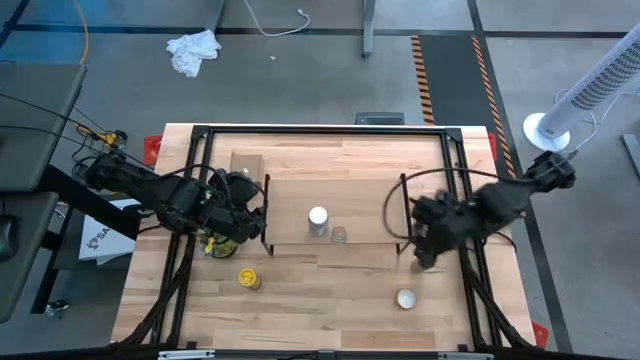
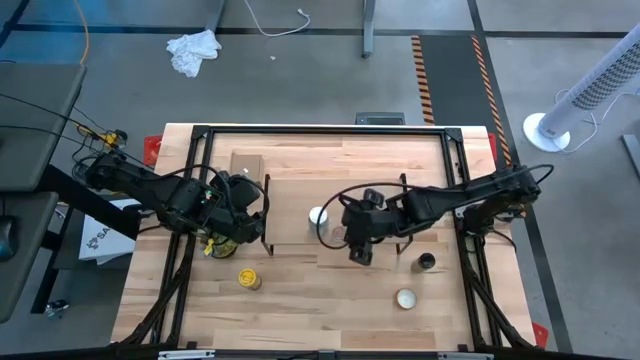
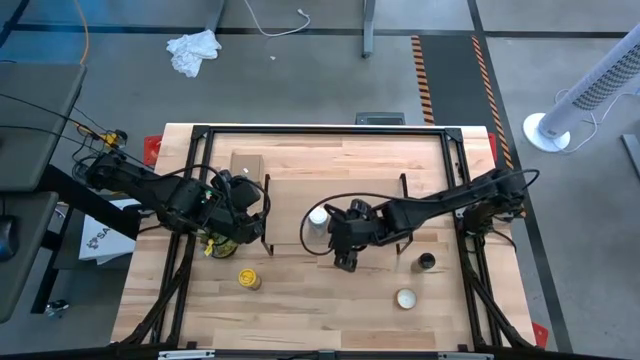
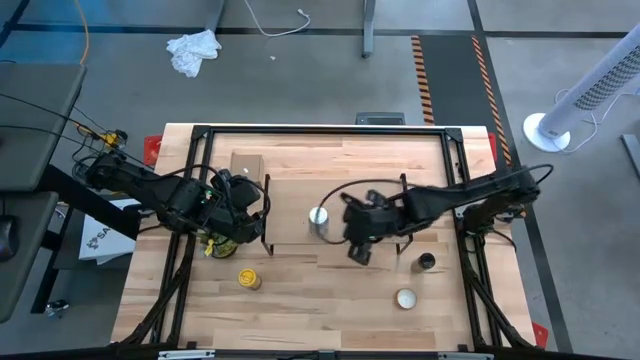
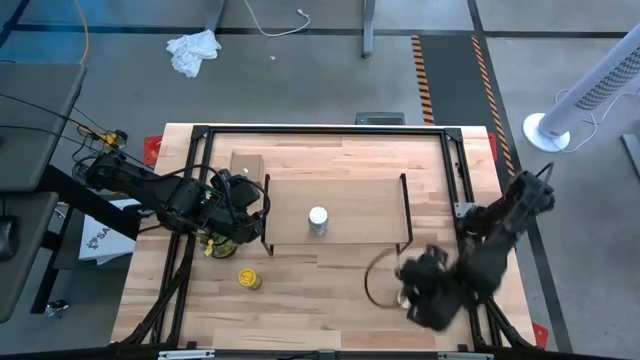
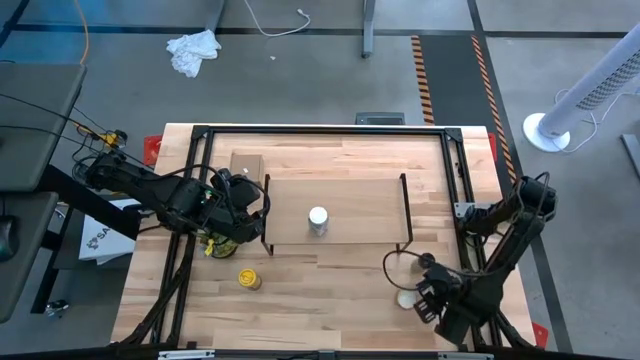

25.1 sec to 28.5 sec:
Task: Shelf spices
Remove the brown seasoning bottle from the shelf

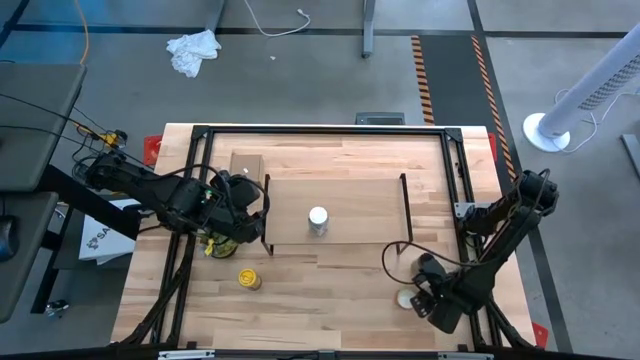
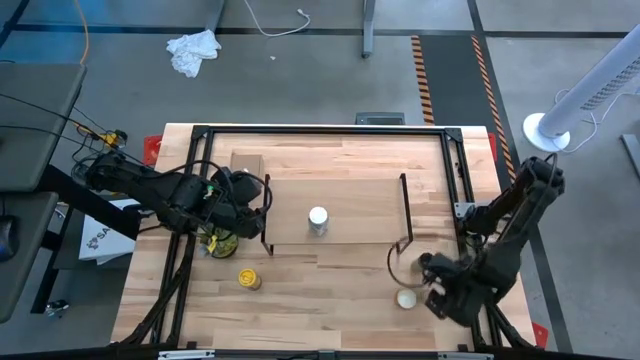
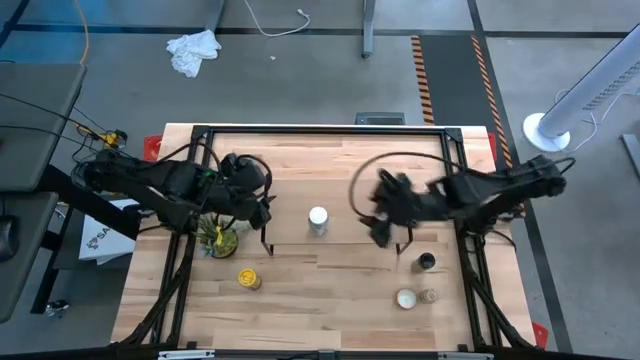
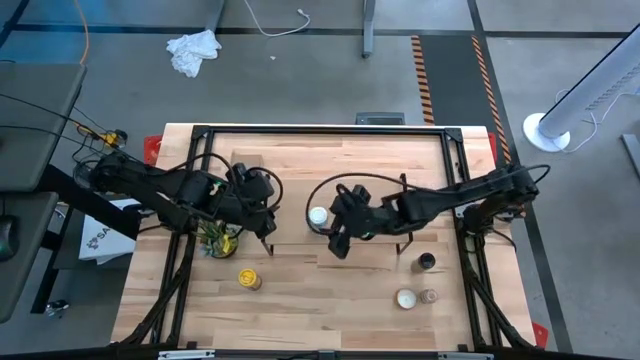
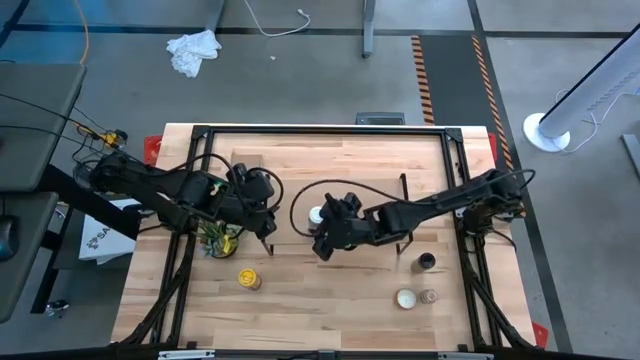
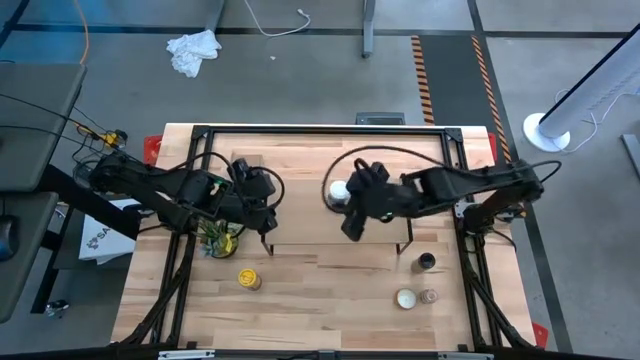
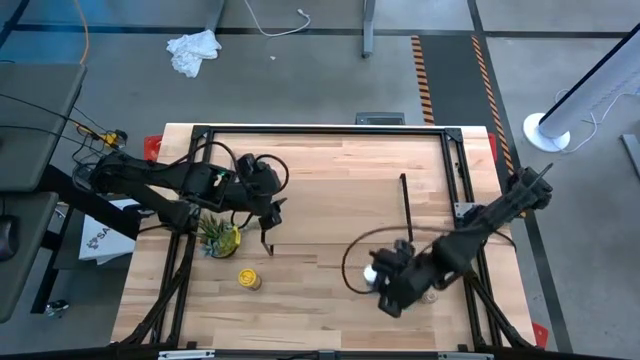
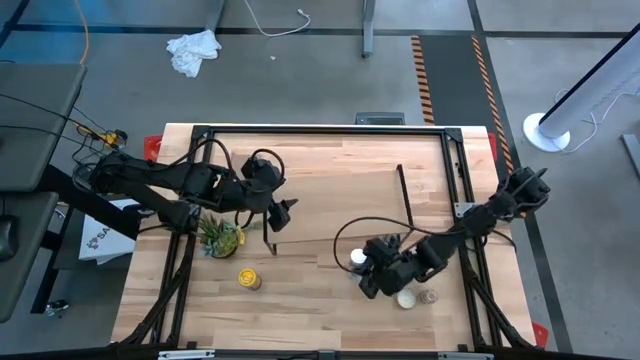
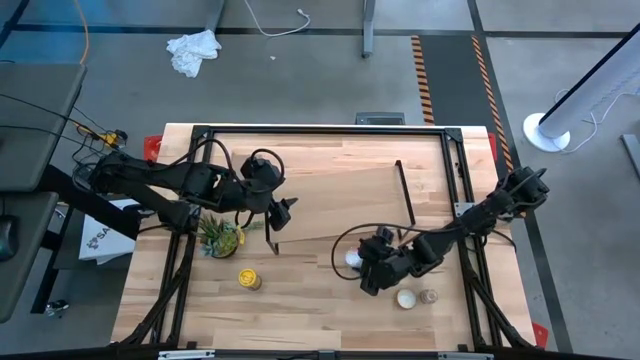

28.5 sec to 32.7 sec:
Remove the white seasoning bottle from the shelf

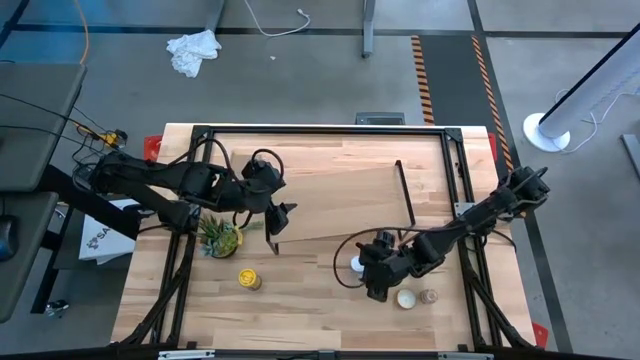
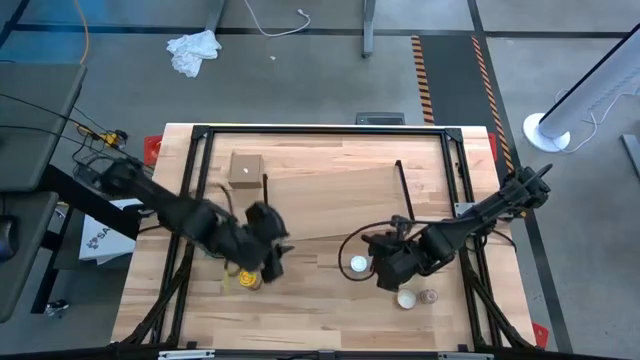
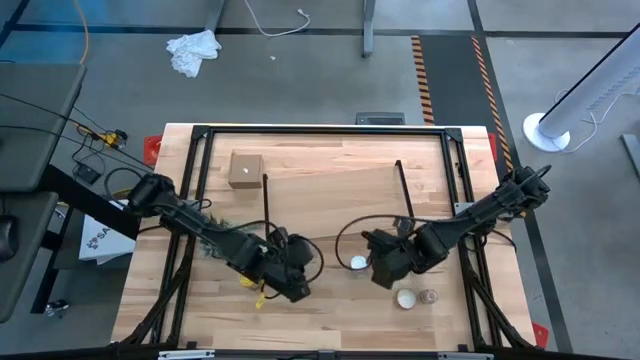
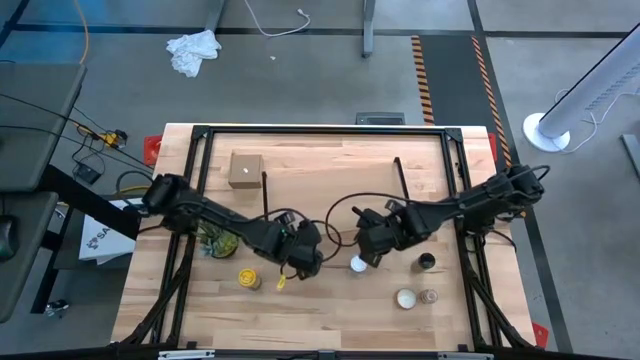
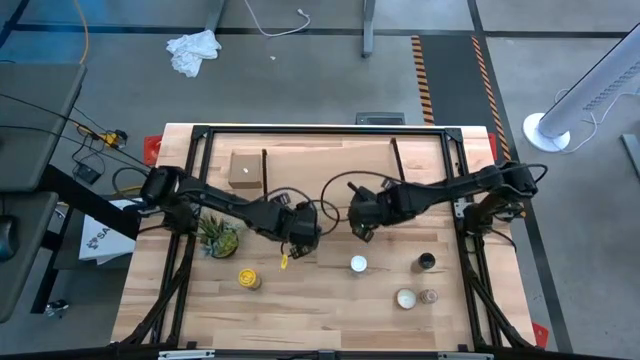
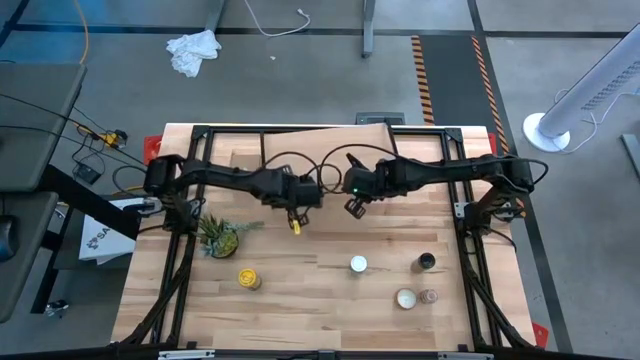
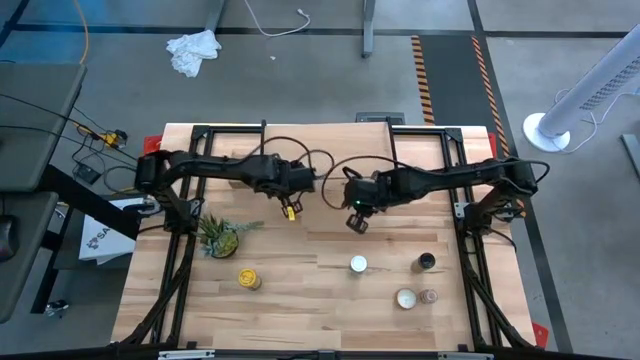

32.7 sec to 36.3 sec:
Move the shelf to the top center of the table

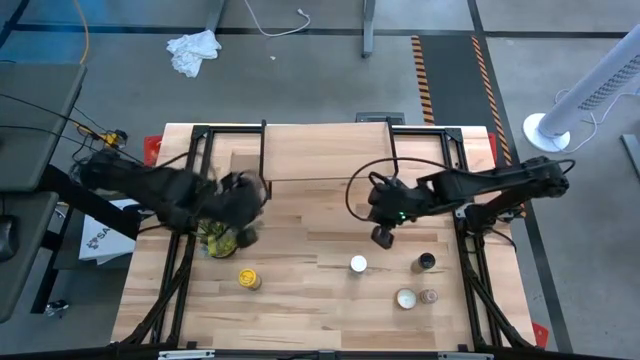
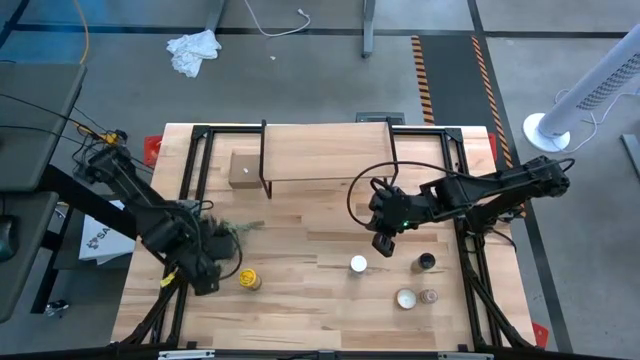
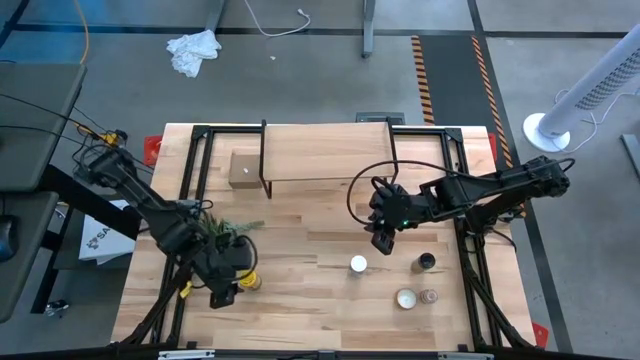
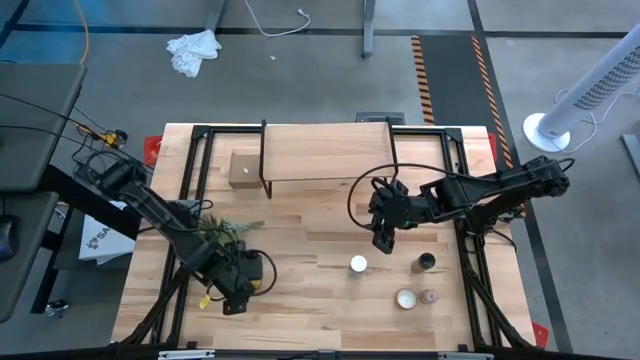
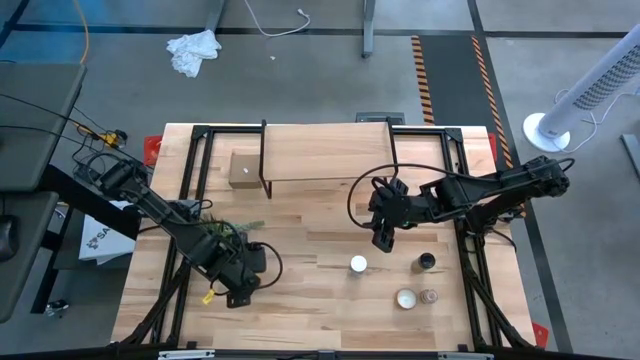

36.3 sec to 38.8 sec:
Put the yellow seasoning bottle on the shelf

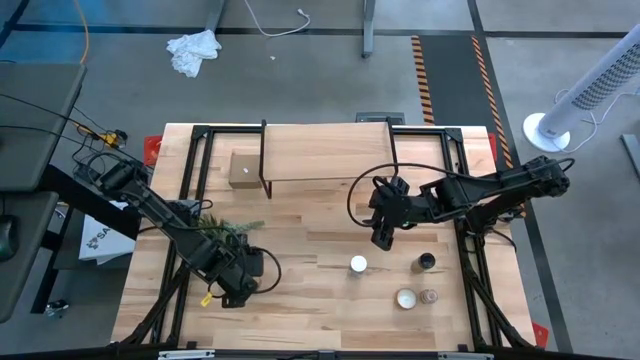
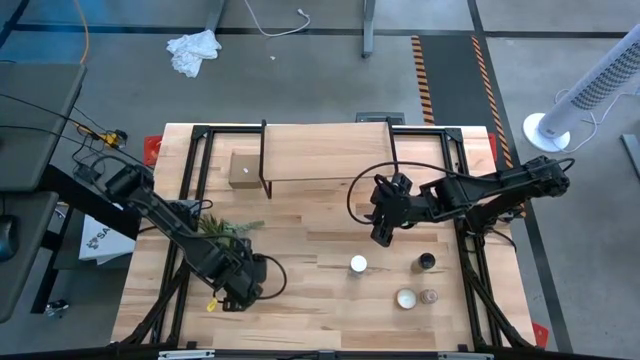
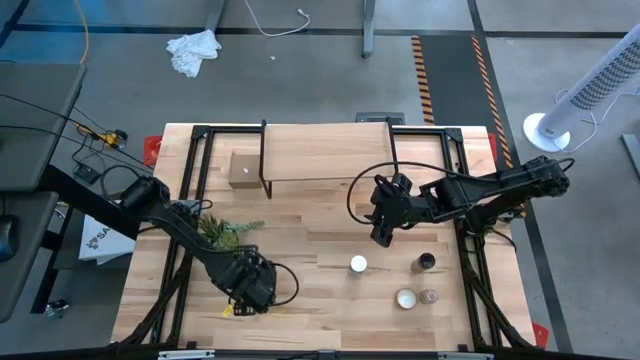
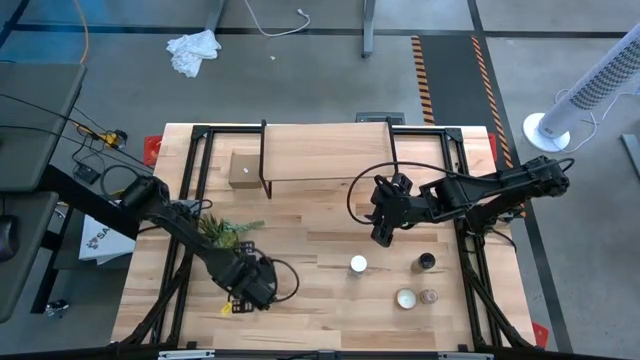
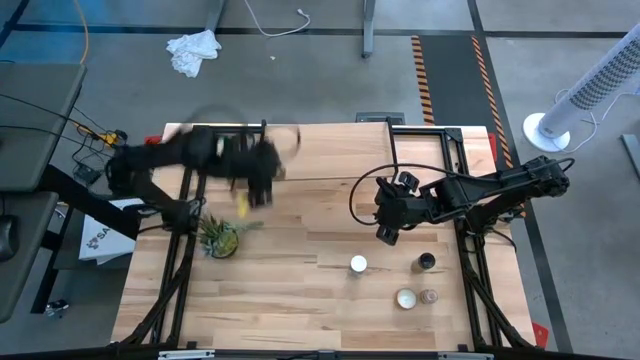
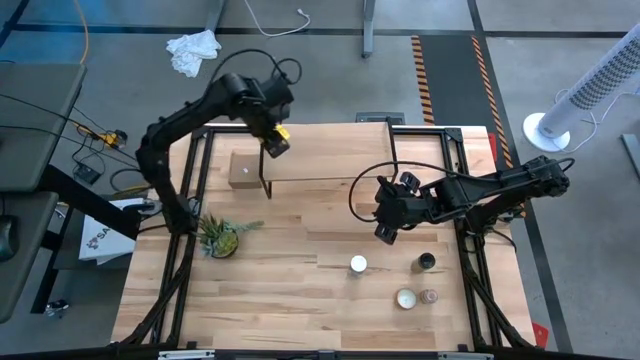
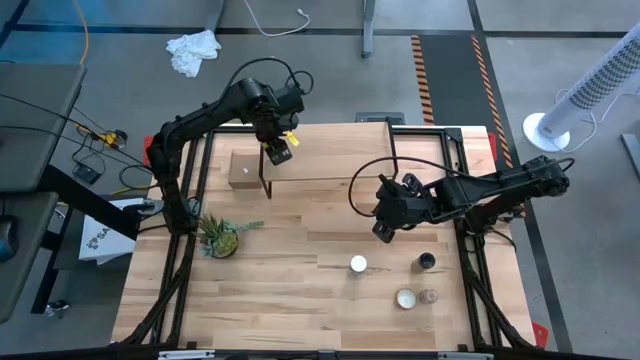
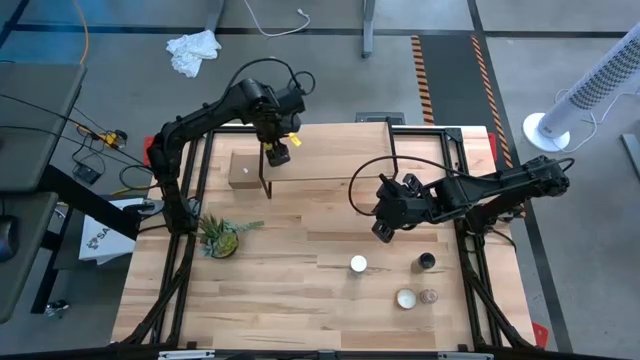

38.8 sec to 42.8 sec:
Put the yellow seasoning bottle on the shelf

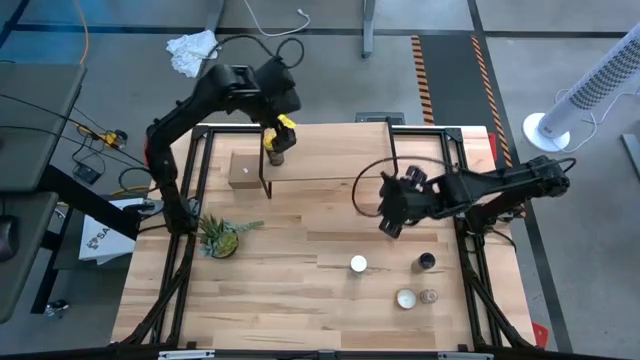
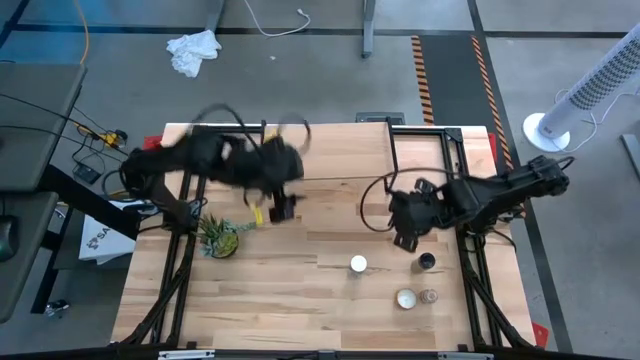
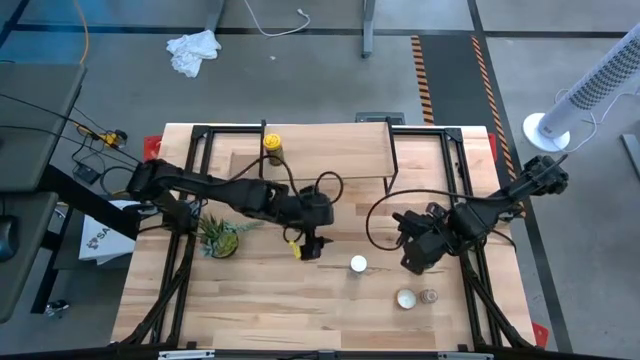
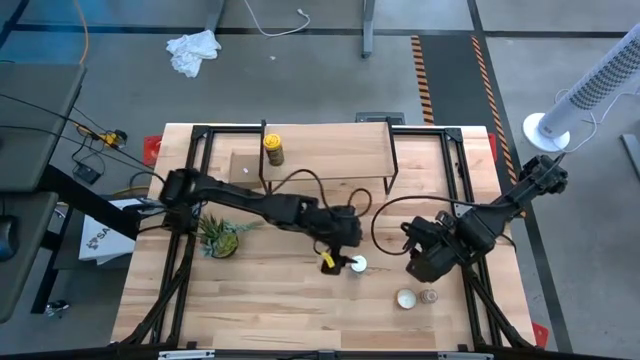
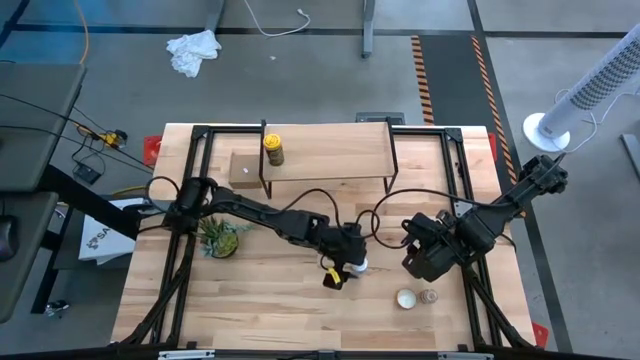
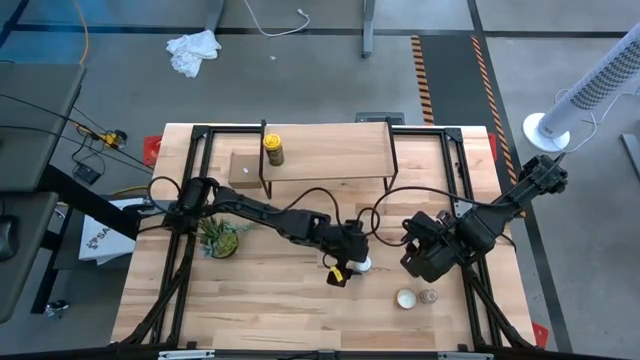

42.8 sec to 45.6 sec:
Put the white seasoning bottle on the shelf

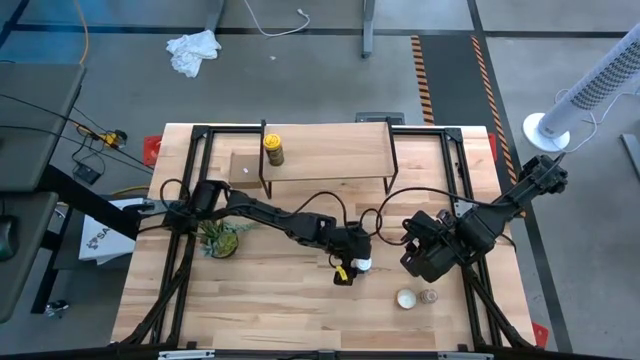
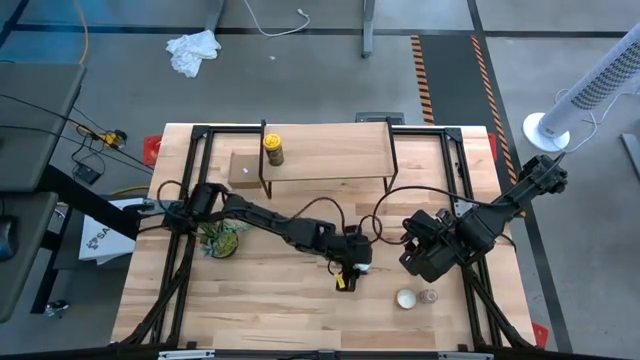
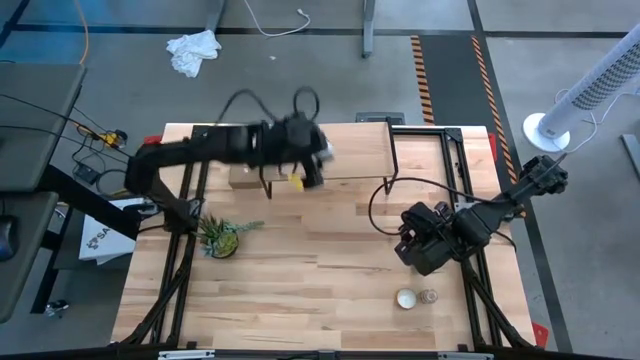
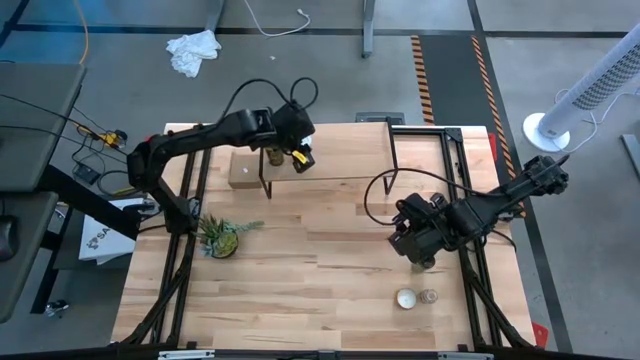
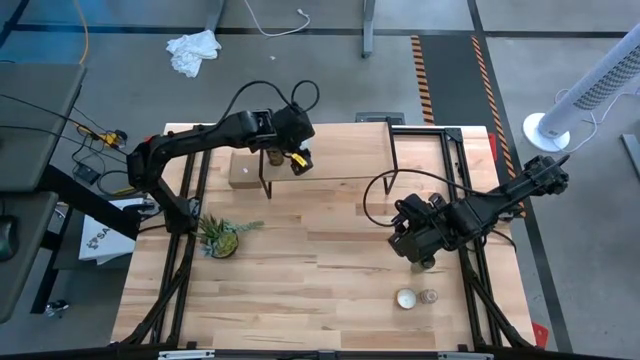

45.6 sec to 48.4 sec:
Put the white seasoning bottle on the shelf
